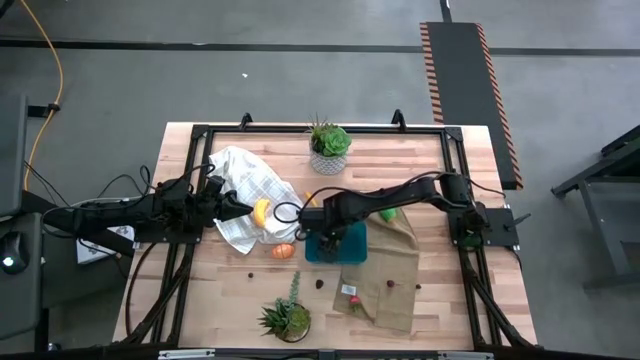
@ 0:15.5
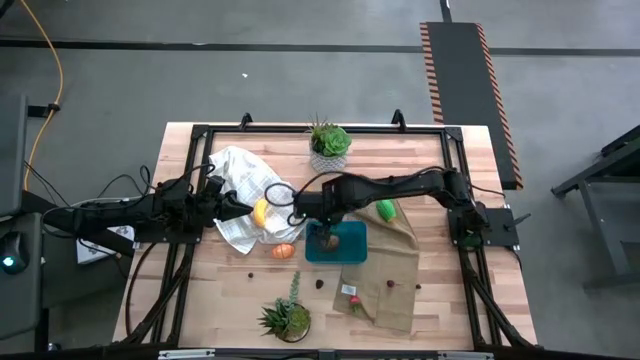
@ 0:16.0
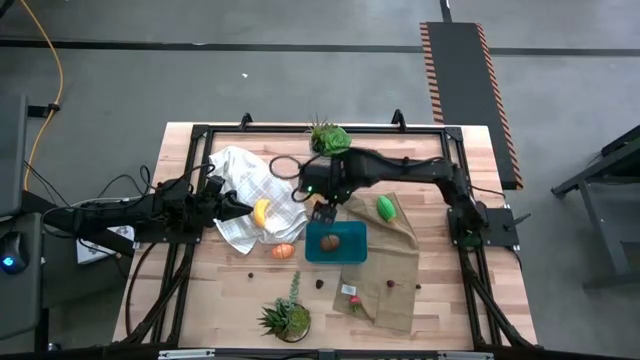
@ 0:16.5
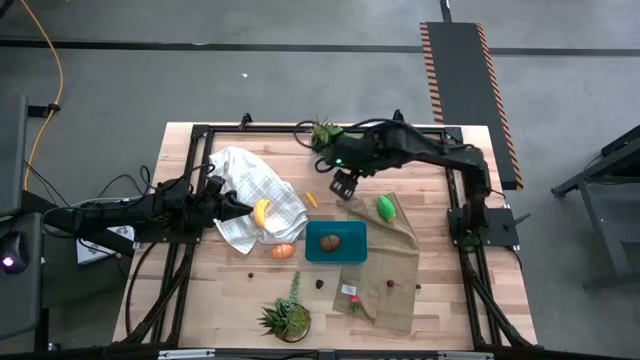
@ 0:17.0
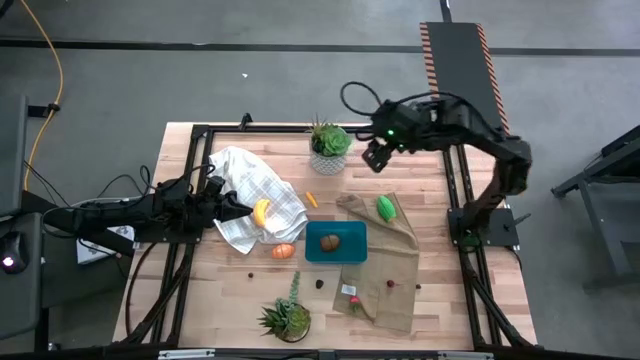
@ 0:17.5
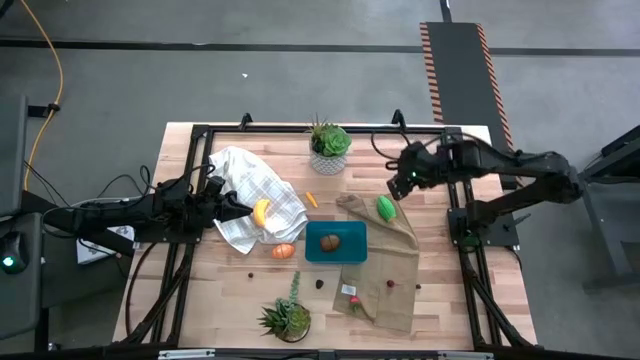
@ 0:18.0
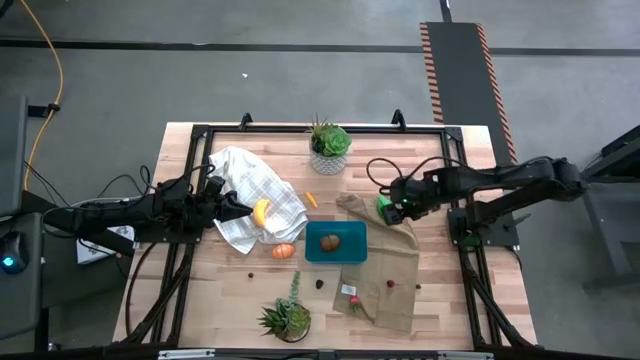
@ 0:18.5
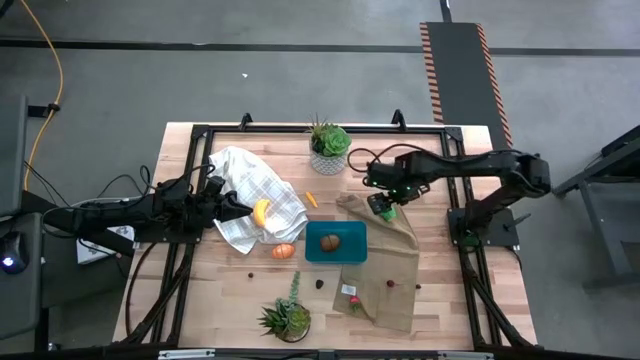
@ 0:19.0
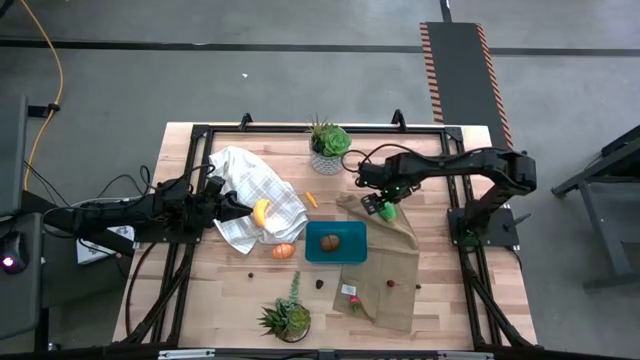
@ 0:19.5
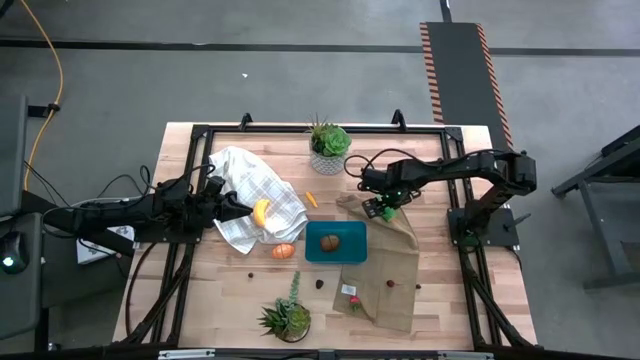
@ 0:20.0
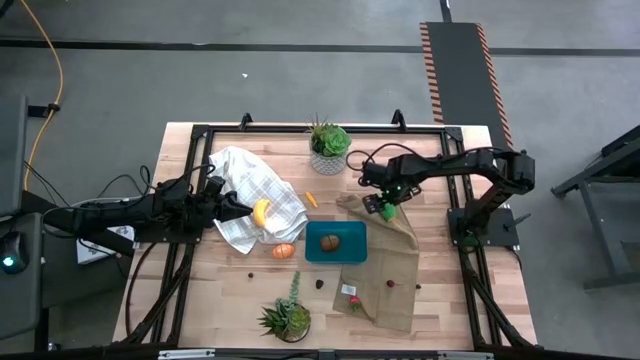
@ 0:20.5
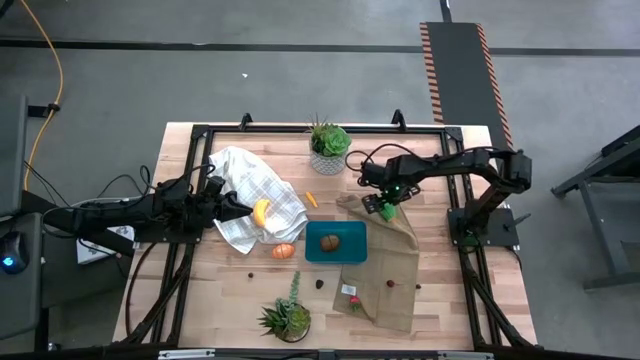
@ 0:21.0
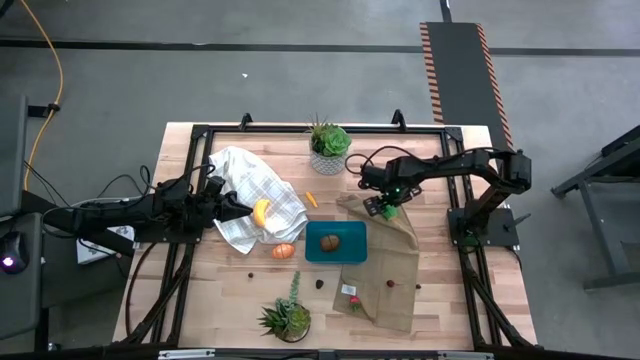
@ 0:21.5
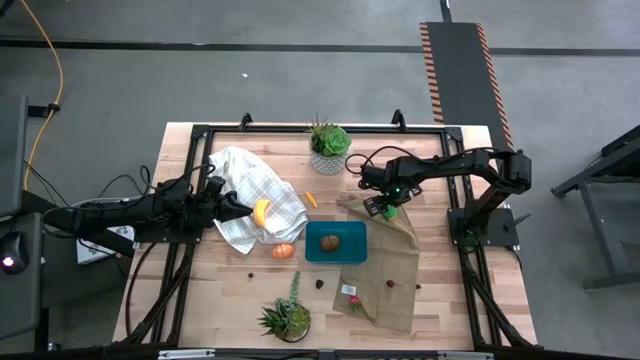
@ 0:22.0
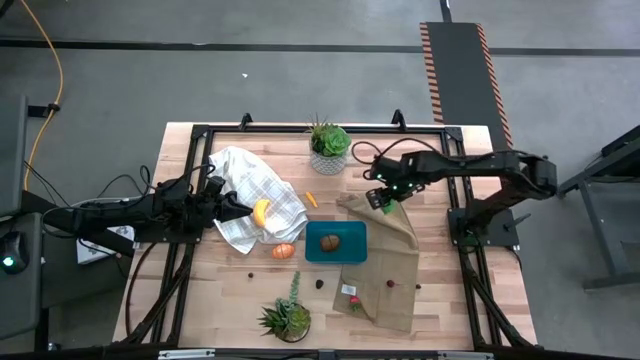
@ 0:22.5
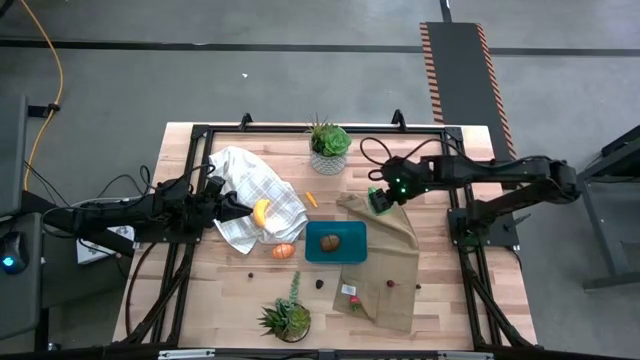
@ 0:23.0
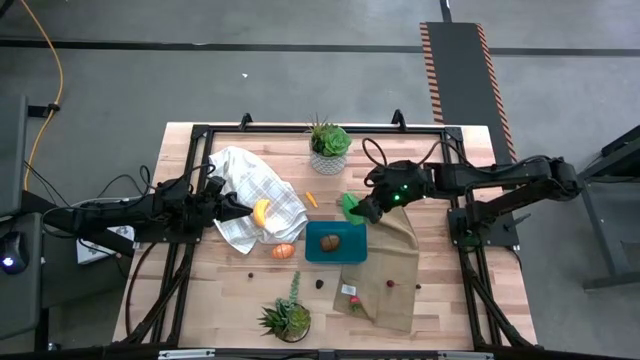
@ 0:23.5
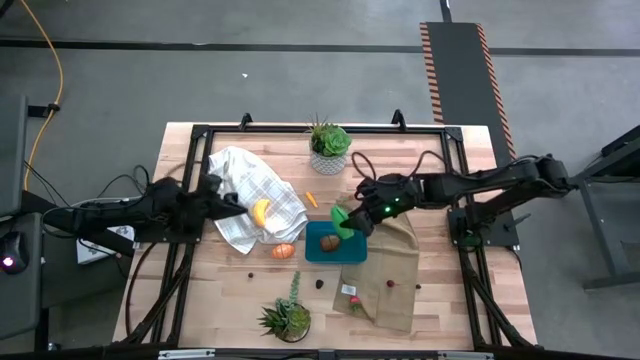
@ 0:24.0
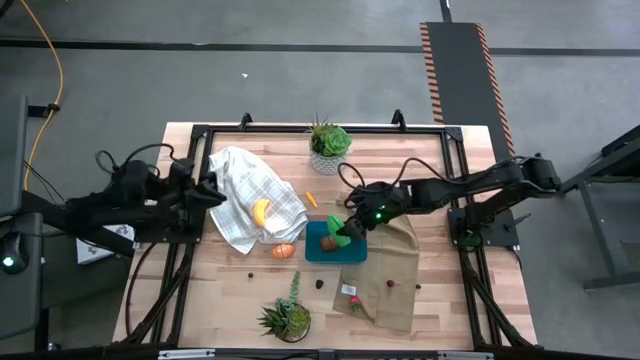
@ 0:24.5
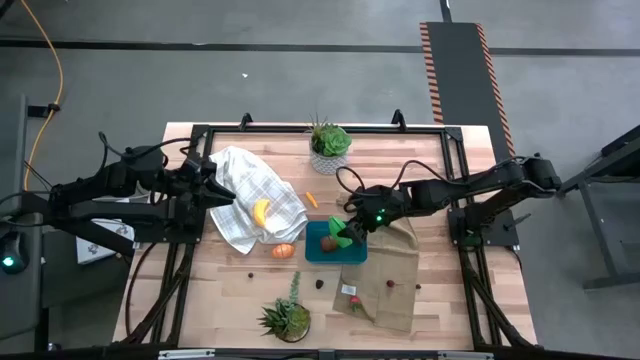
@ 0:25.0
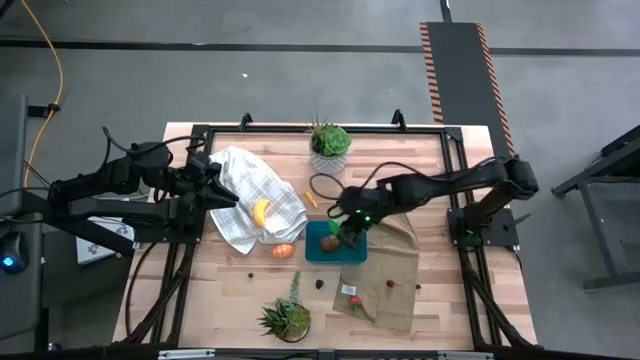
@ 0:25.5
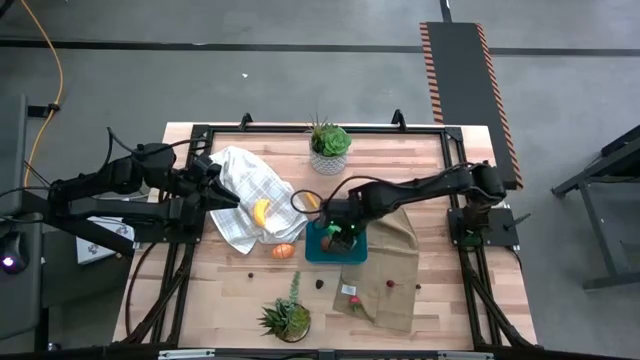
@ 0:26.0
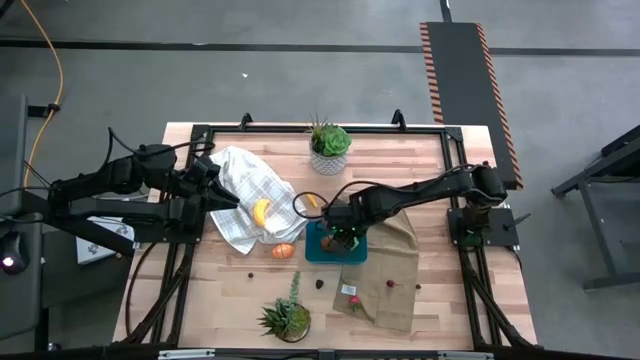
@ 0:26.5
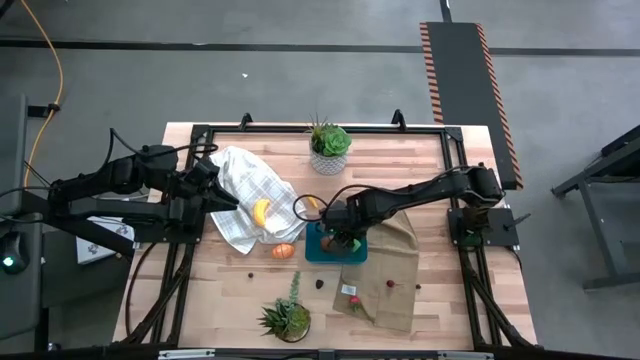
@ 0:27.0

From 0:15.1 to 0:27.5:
Task: Pick and placing Produce into tupperware
Put the green corn into the blue bin

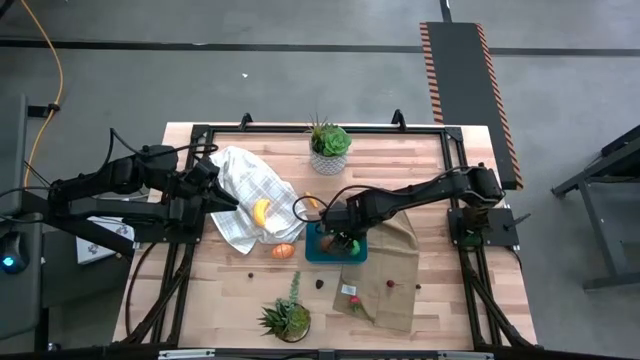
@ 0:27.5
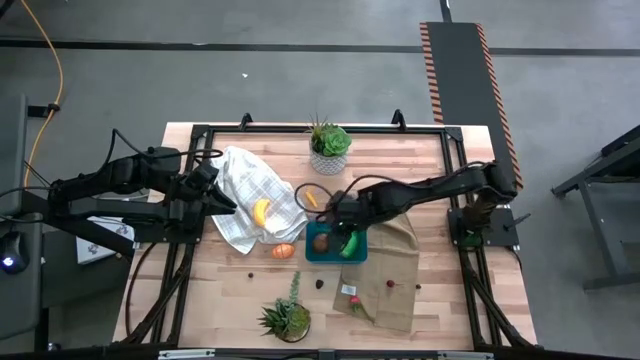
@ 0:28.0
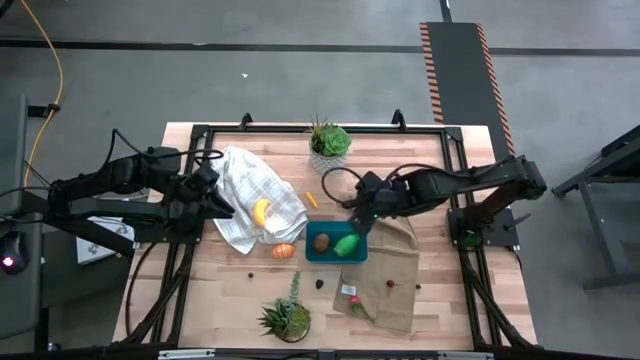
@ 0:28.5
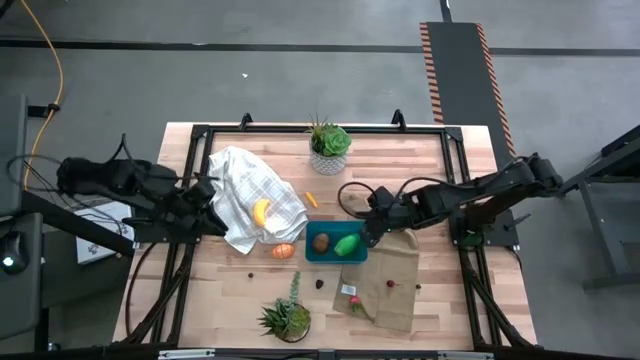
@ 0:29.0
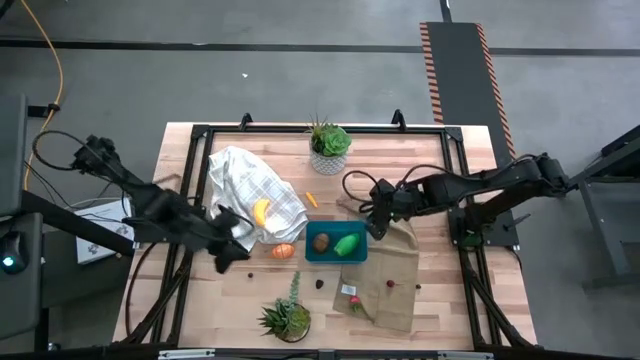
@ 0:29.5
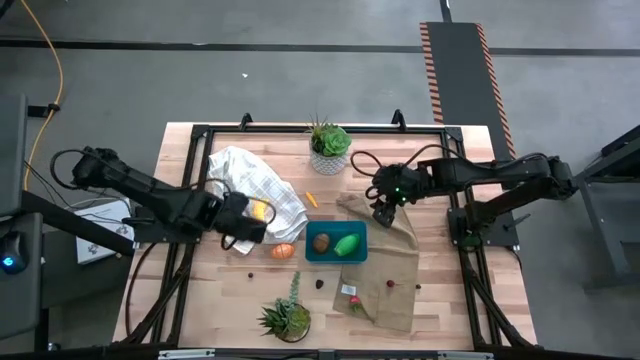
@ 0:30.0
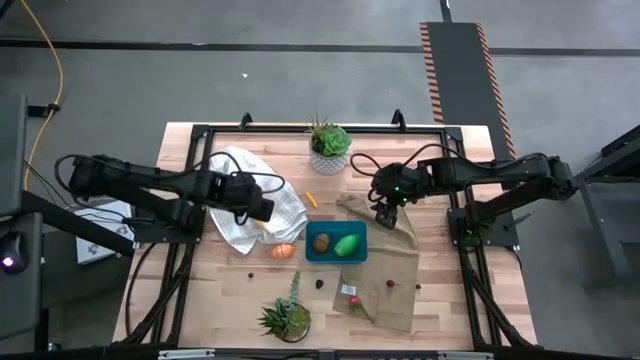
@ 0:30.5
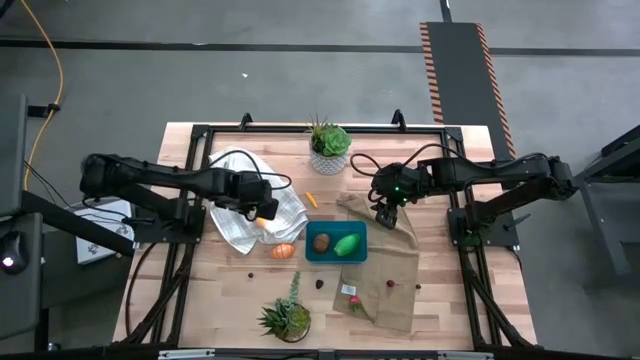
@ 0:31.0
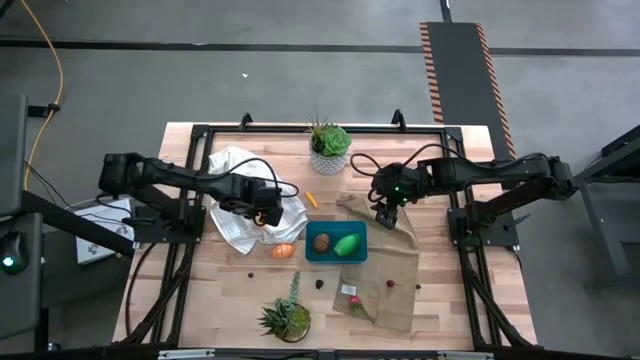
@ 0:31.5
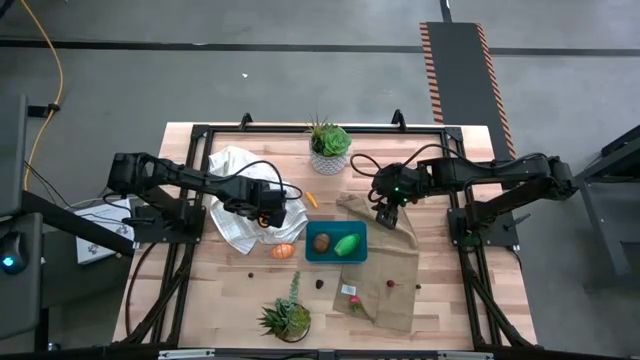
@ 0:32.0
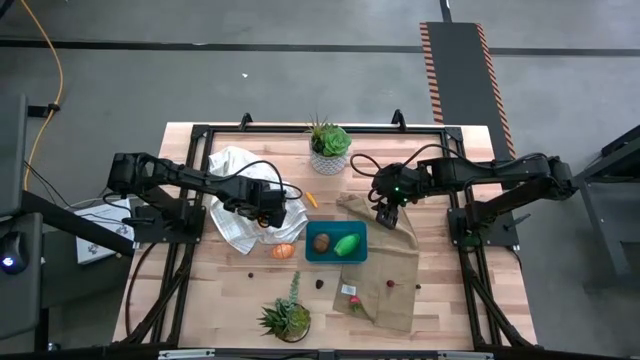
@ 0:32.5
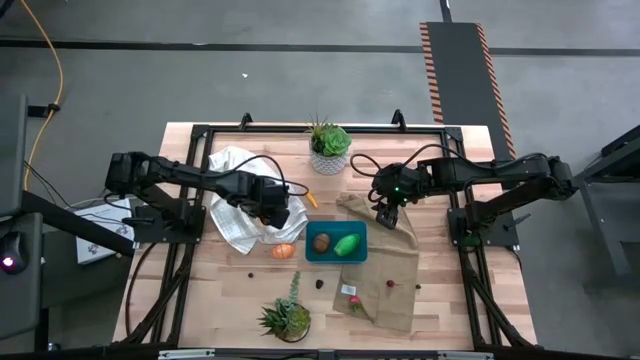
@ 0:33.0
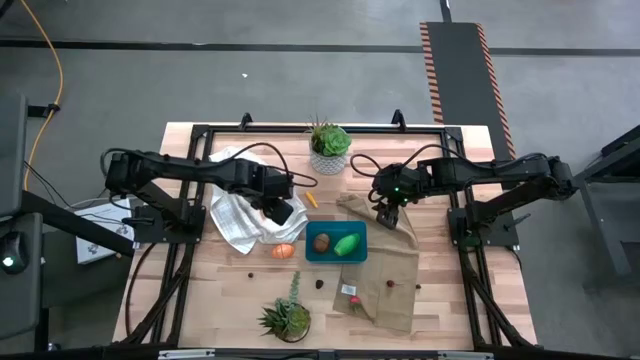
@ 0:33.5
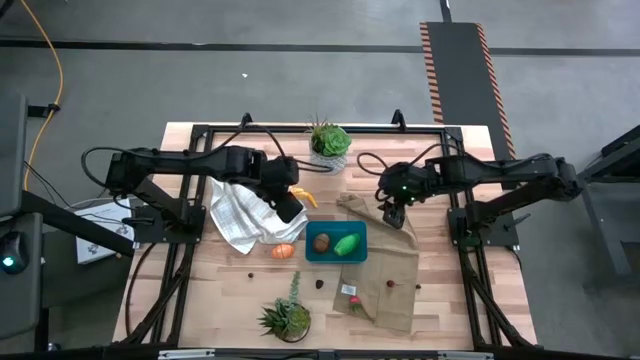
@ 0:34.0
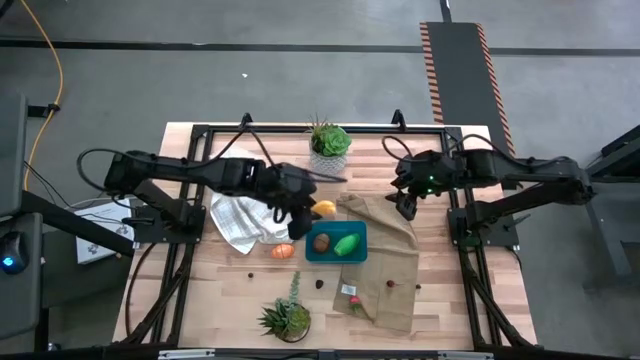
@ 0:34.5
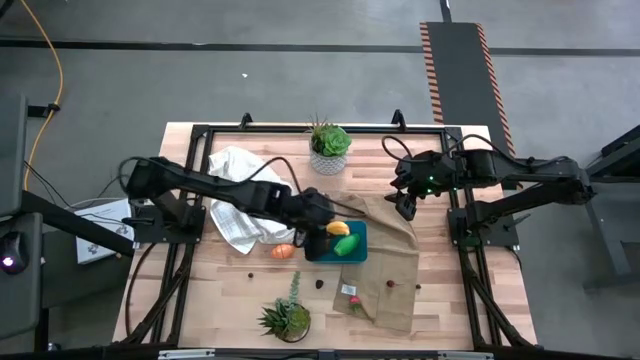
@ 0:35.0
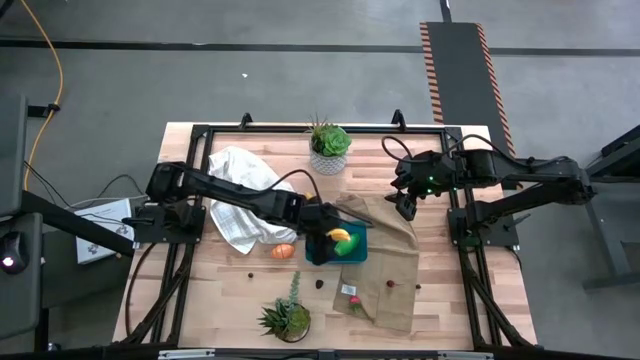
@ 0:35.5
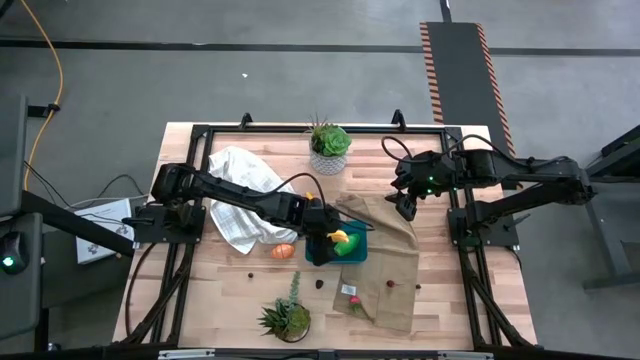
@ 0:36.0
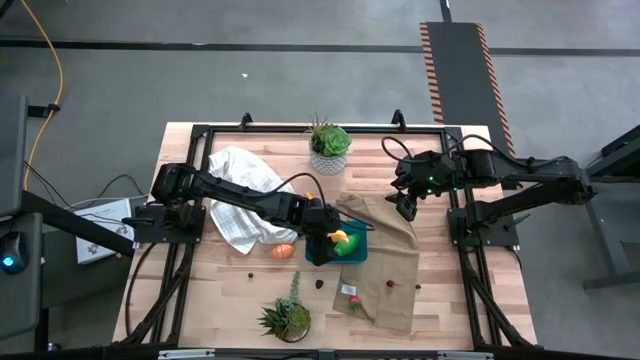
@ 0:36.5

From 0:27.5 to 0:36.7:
Put the yellow banana into the blue bin
